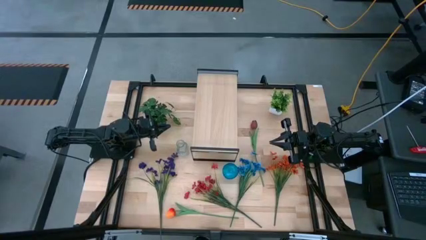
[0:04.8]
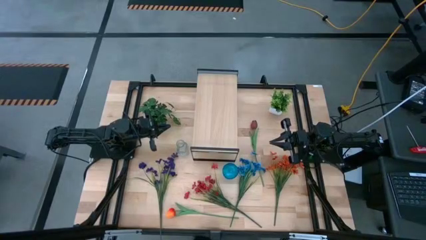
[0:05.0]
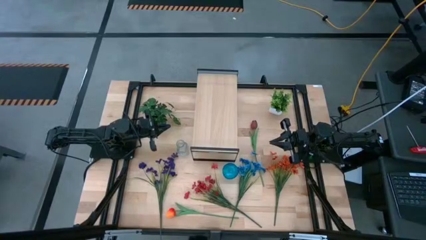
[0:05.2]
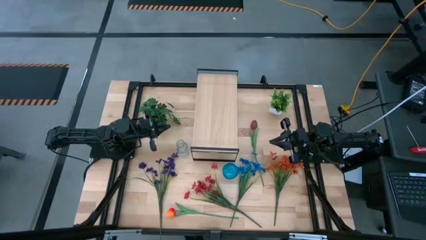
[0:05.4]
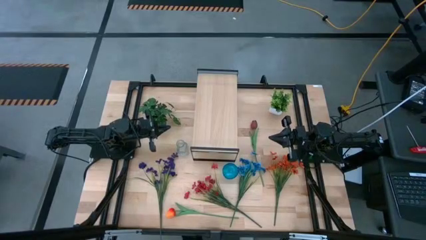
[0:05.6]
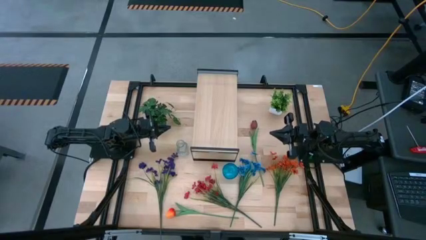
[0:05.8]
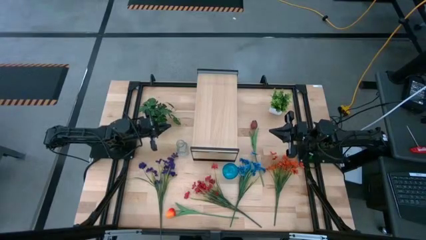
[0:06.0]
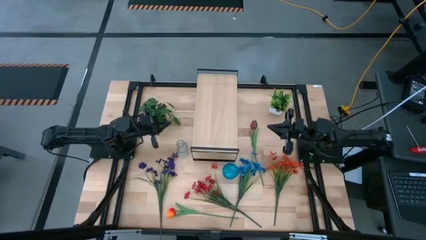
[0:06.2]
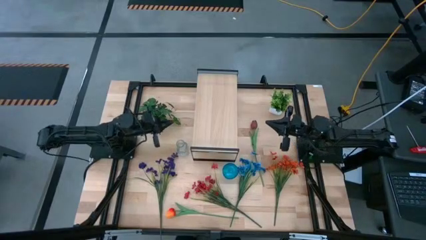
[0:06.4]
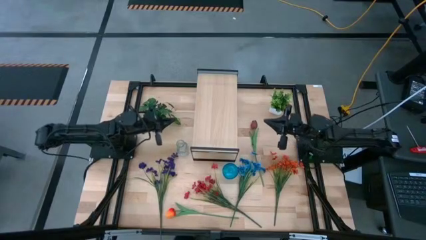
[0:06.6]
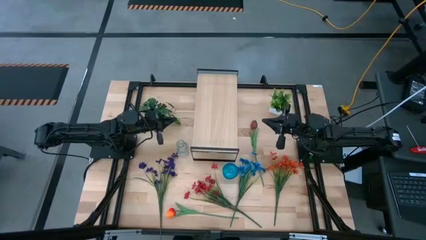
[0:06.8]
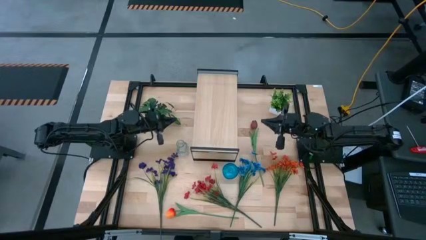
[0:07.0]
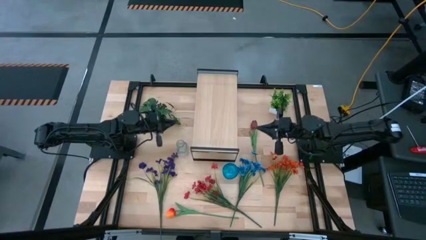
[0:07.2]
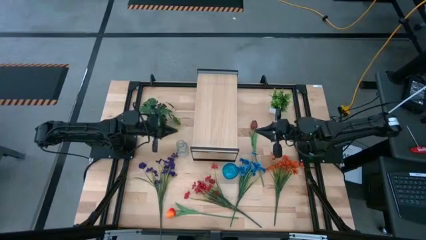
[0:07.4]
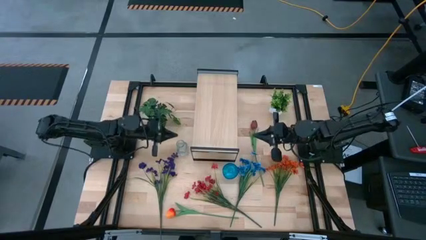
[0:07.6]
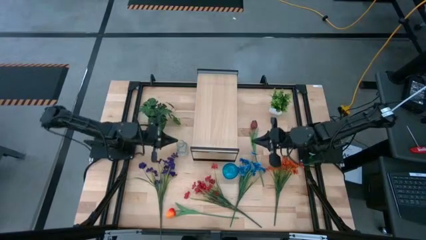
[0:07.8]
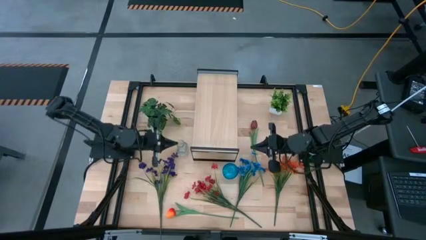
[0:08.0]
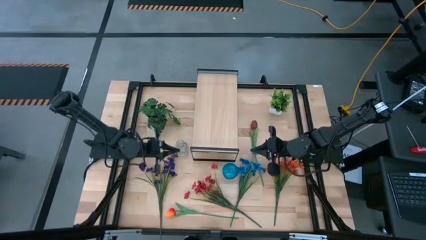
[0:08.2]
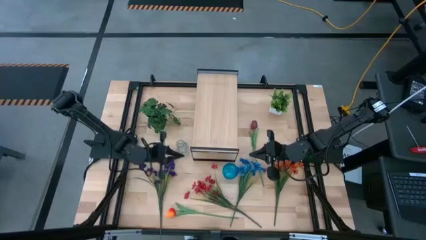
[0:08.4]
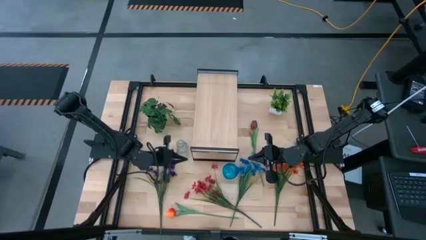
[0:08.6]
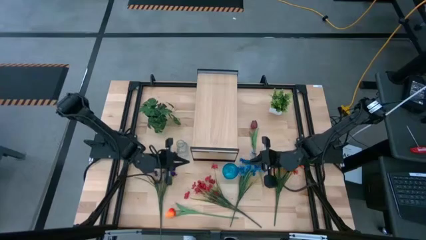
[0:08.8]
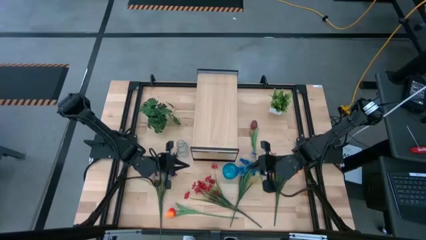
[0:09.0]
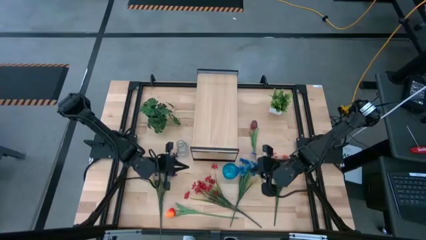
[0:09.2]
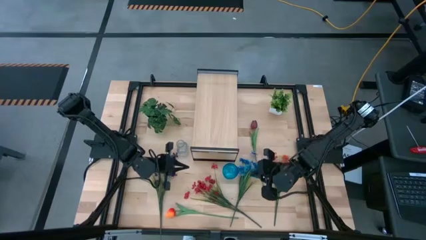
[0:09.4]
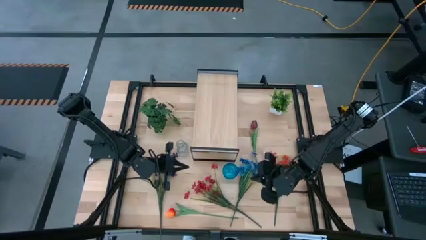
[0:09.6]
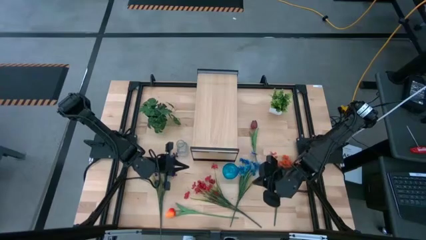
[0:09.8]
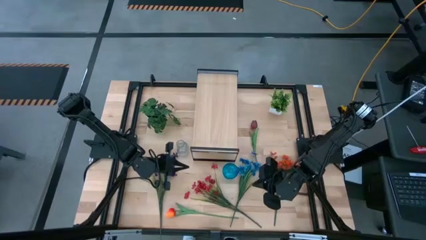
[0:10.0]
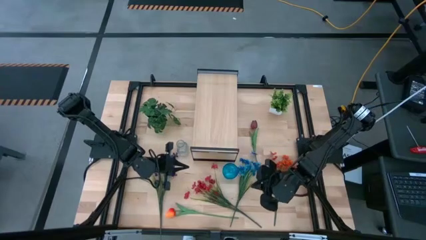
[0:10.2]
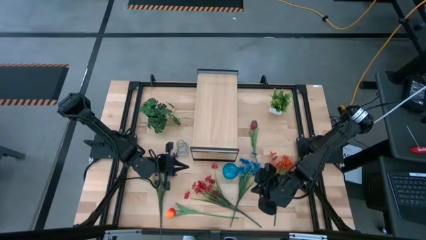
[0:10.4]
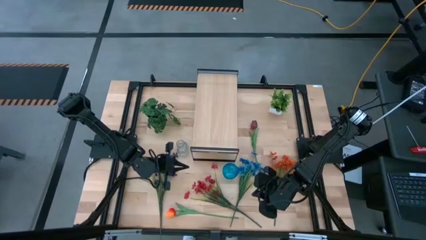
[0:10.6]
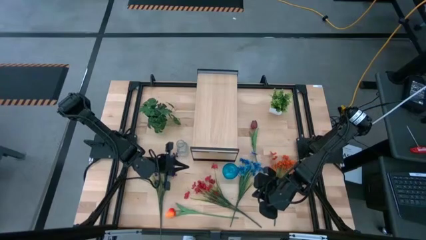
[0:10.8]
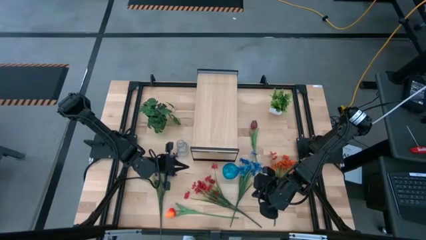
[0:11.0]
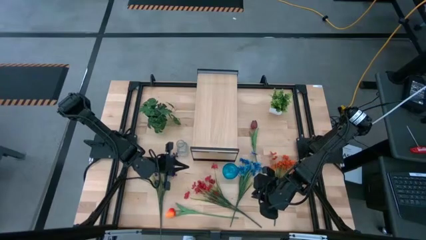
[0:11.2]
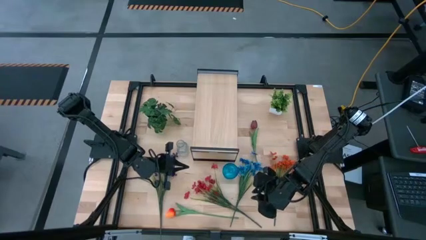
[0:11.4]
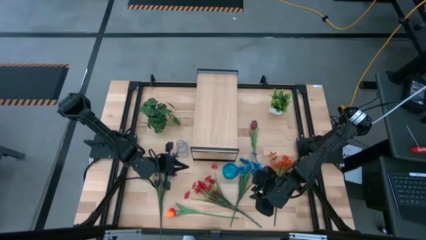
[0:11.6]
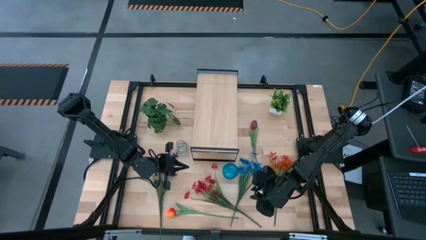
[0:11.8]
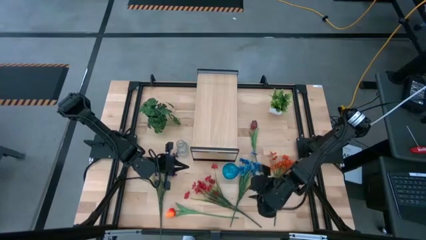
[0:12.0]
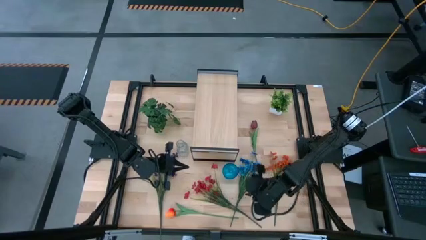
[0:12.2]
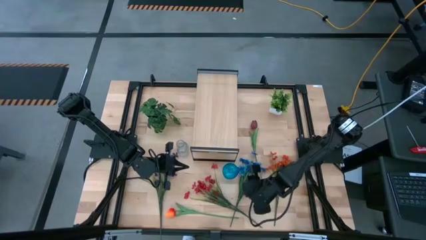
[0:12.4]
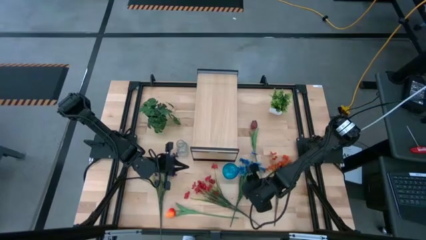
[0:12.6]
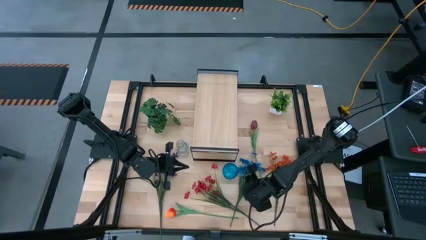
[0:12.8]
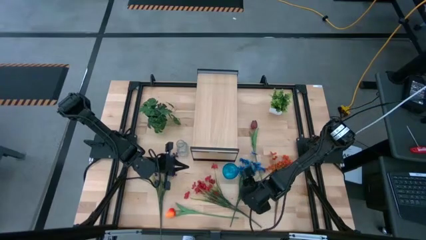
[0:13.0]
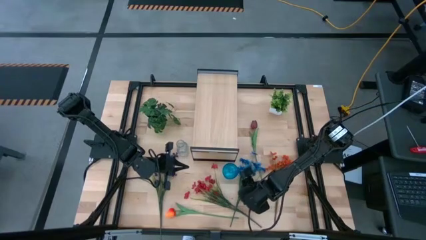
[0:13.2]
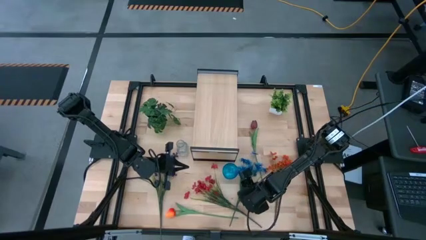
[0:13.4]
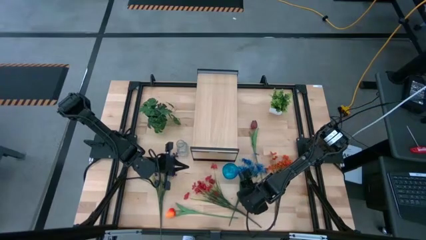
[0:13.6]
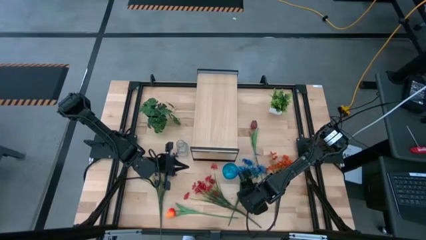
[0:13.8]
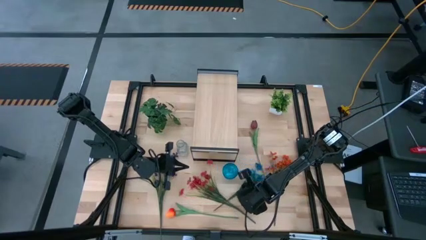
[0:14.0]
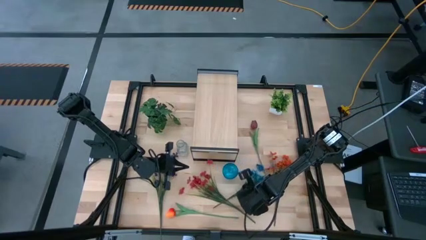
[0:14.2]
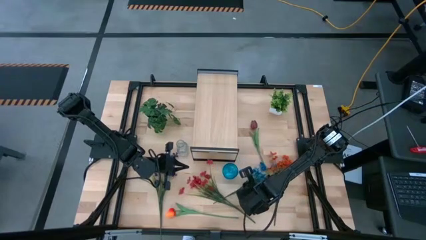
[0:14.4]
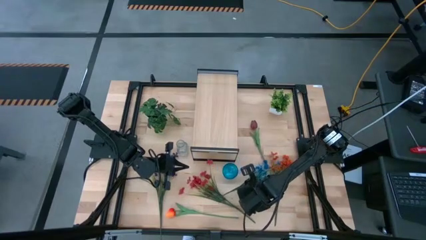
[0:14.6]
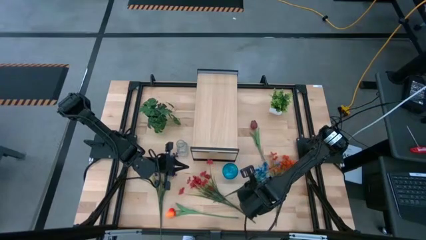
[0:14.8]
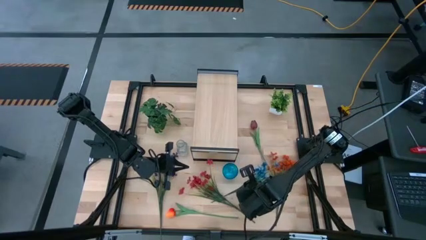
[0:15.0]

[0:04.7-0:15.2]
Task: Pick and place flowers into a vace then onto a shelf
Put the blue flowers into the transparent vase

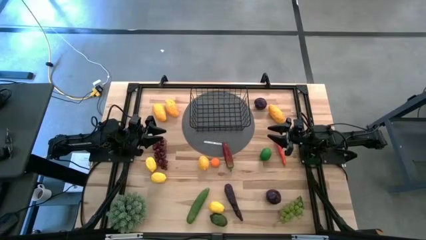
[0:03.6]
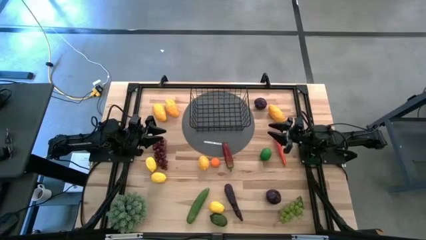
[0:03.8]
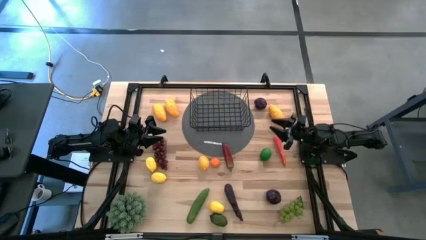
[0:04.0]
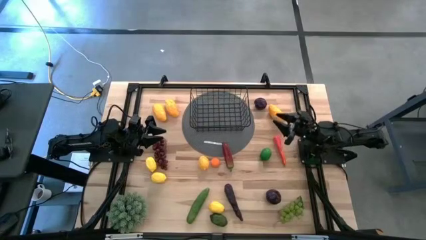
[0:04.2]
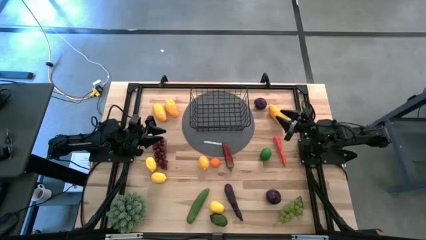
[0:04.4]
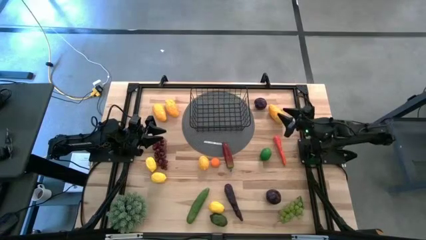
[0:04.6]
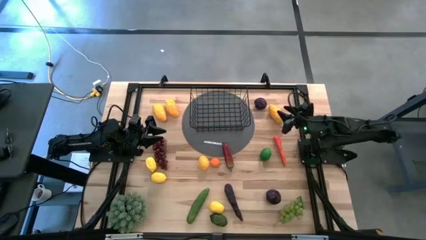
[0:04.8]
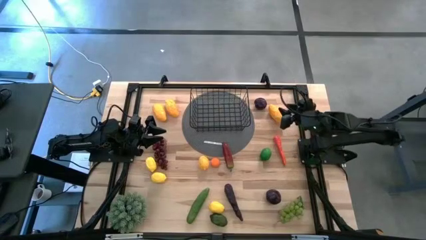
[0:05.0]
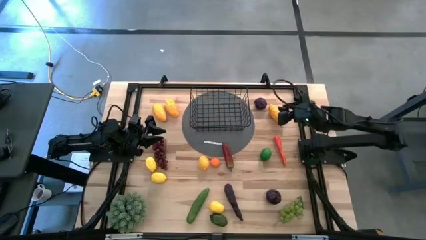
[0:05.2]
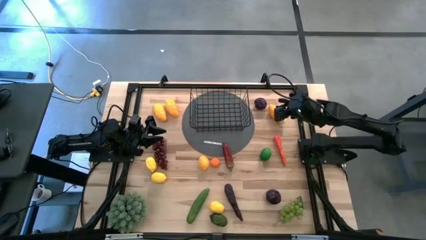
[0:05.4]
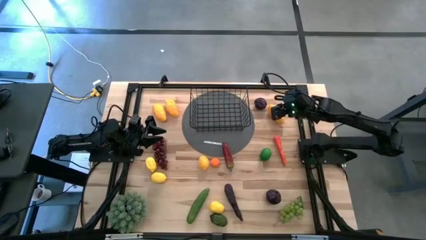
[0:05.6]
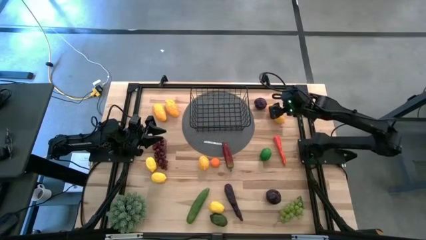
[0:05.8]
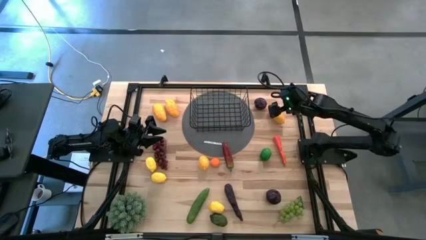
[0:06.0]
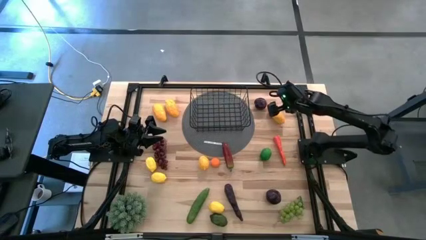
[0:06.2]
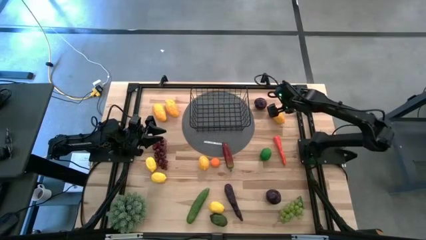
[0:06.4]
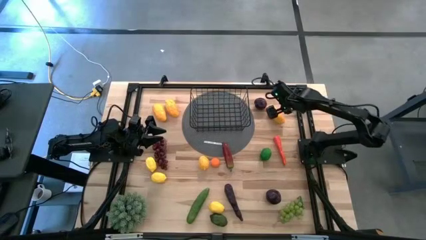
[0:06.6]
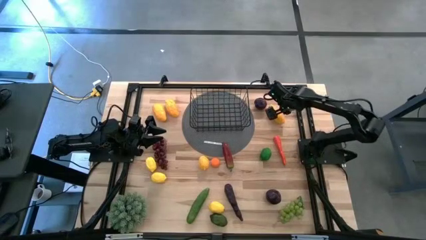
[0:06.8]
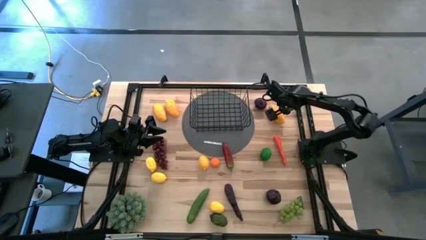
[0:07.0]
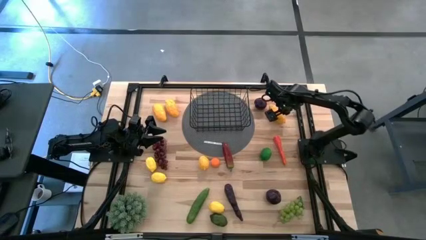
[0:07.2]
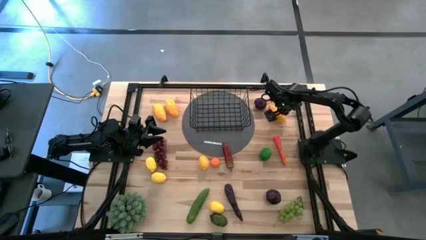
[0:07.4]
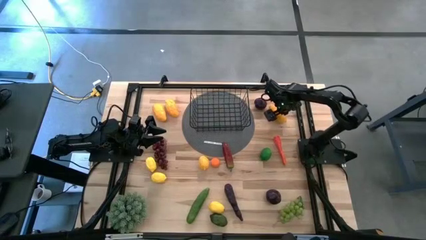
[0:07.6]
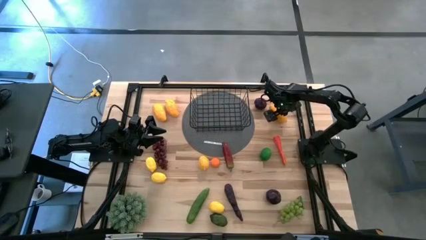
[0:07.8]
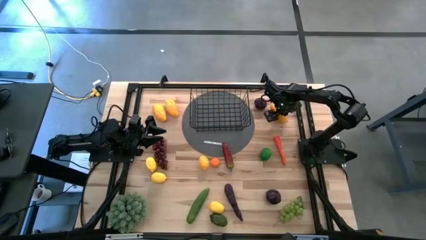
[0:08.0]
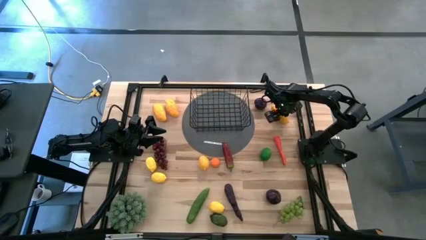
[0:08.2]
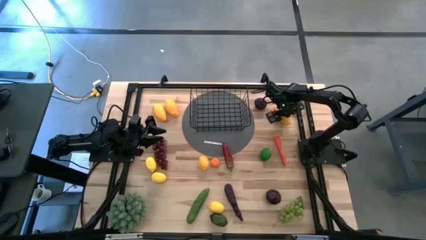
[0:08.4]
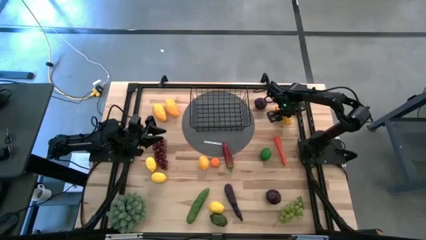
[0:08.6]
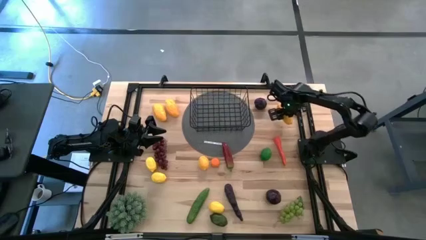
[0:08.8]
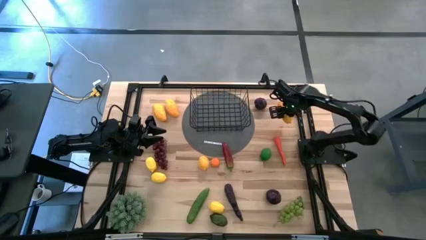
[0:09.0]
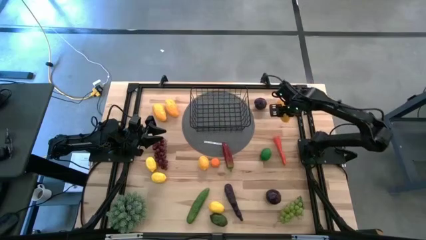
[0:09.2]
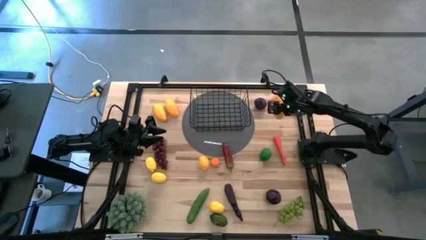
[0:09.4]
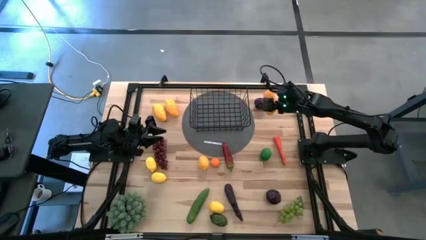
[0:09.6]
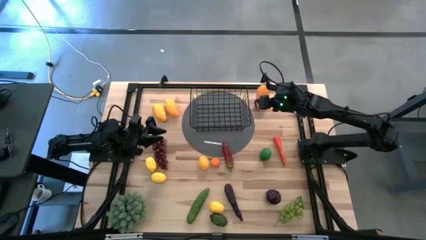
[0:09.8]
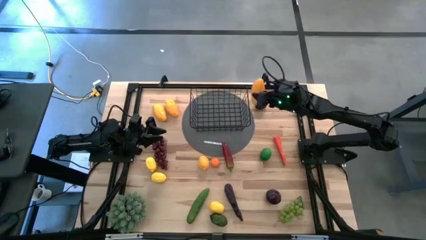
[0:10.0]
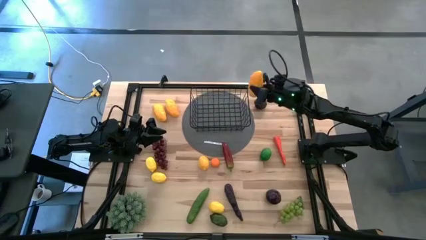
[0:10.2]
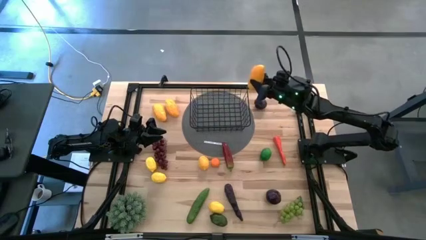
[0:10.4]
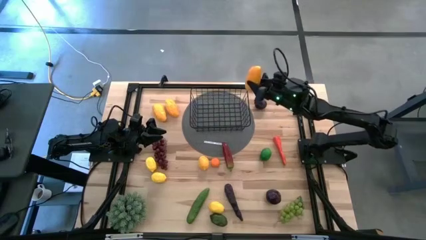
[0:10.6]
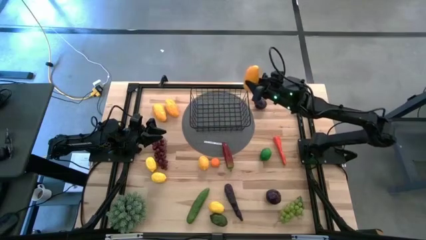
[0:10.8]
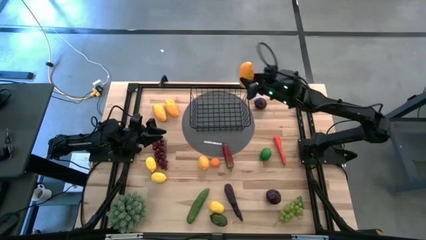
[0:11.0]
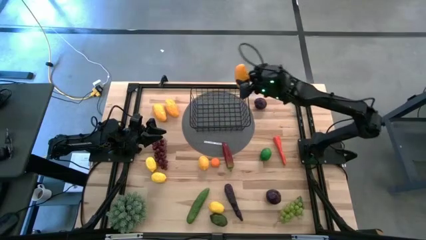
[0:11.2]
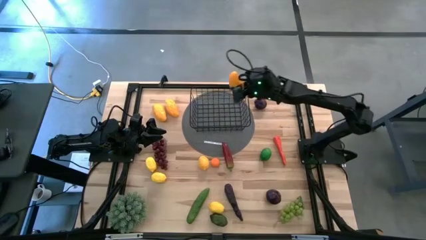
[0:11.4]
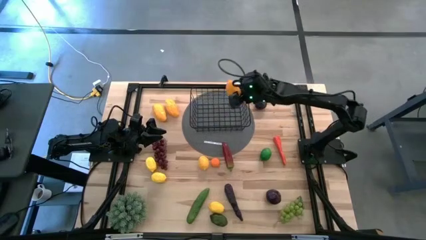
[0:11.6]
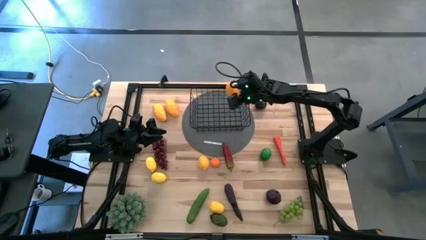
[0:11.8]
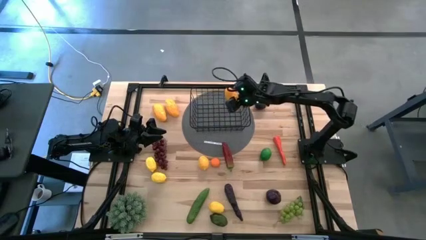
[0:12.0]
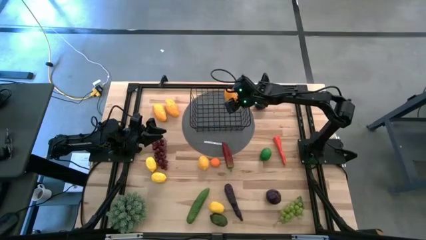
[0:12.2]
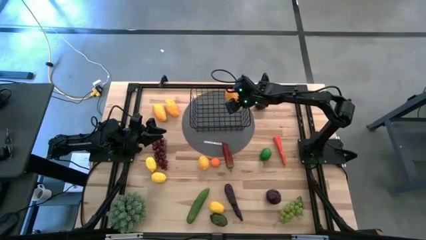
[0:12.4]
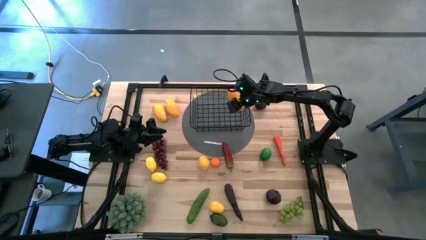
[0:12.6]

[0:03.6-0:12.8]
Task: Build produce basket
Put the right yellow mango into the black wire basket
